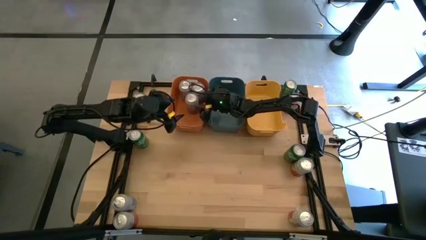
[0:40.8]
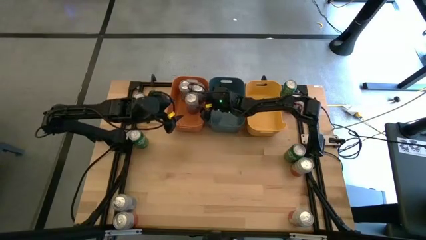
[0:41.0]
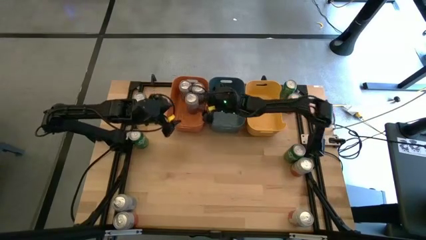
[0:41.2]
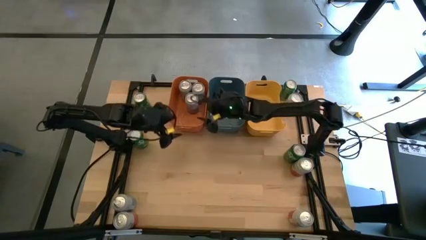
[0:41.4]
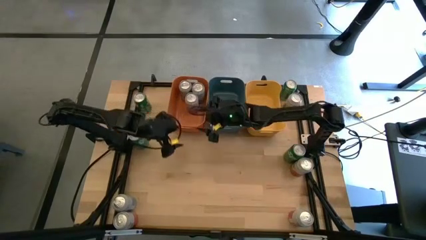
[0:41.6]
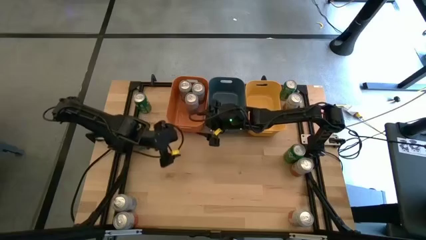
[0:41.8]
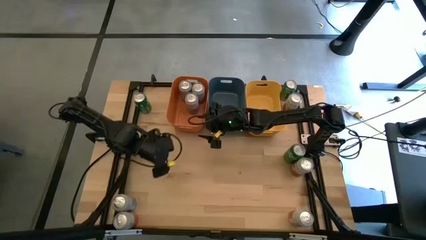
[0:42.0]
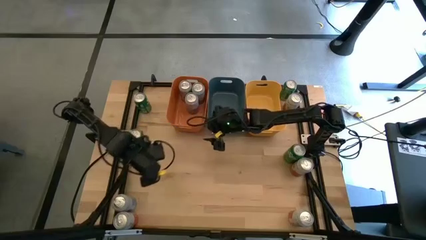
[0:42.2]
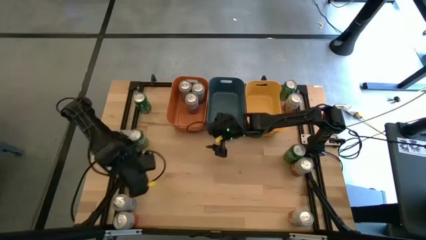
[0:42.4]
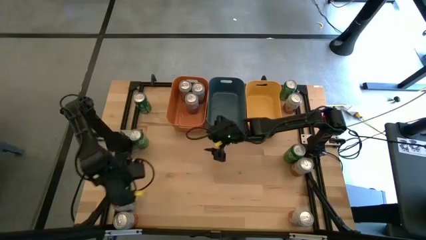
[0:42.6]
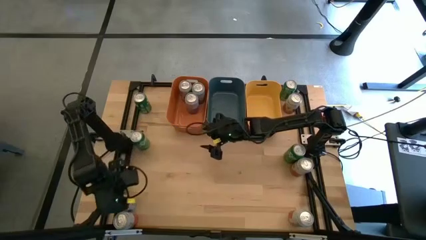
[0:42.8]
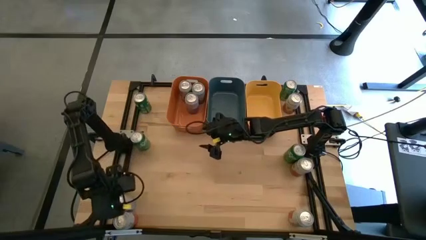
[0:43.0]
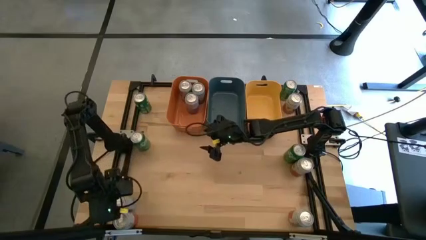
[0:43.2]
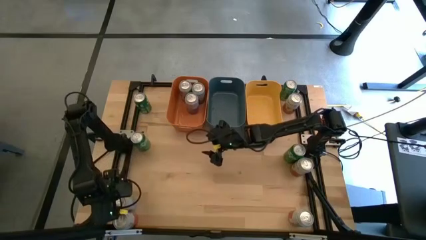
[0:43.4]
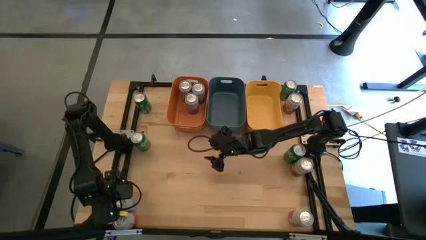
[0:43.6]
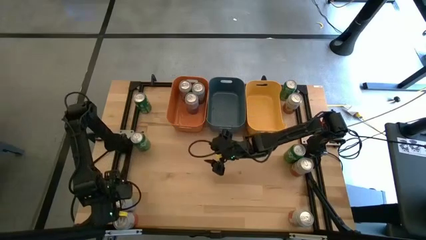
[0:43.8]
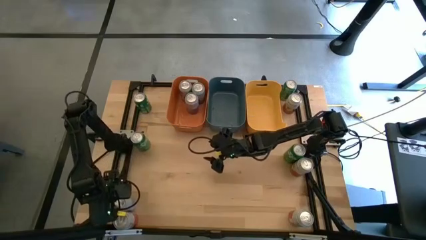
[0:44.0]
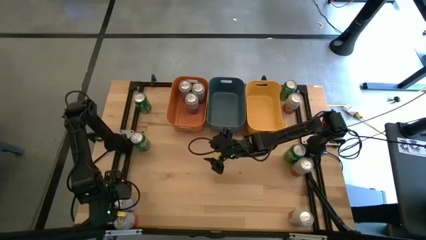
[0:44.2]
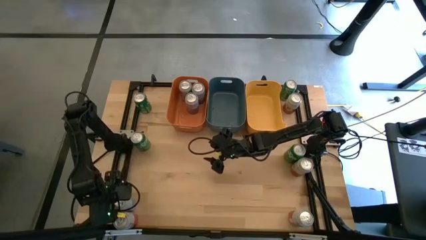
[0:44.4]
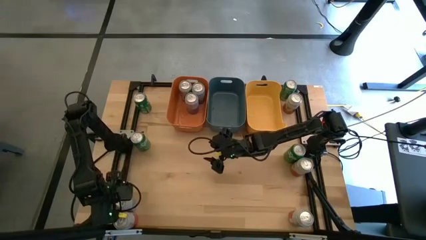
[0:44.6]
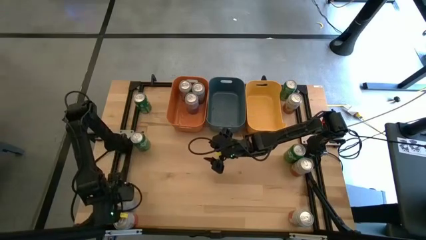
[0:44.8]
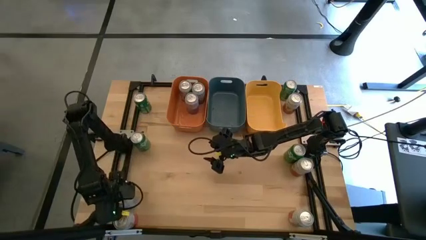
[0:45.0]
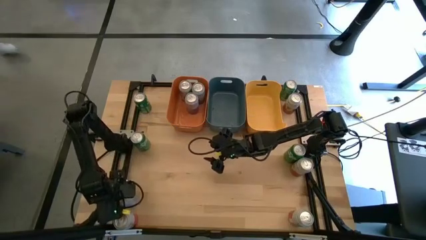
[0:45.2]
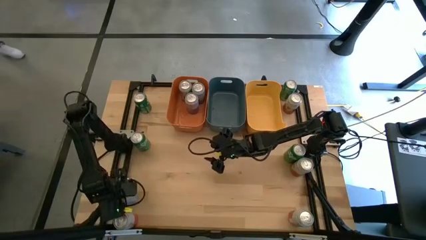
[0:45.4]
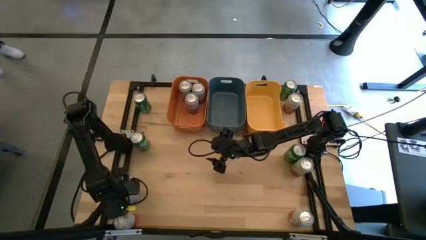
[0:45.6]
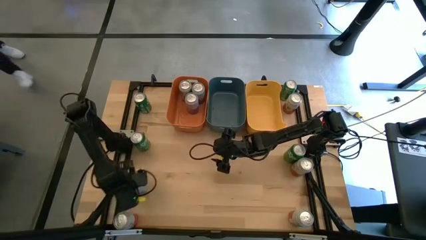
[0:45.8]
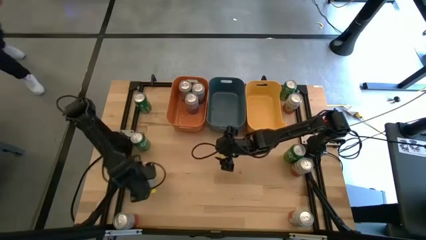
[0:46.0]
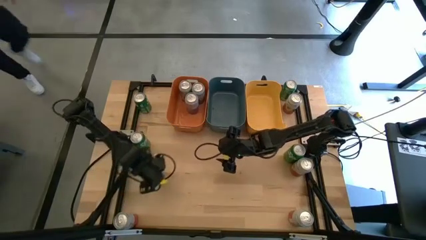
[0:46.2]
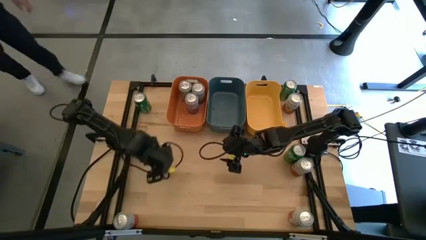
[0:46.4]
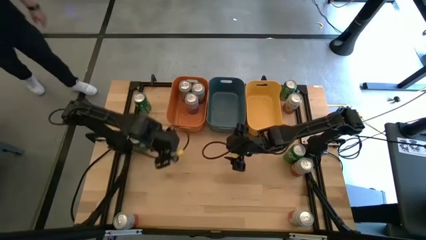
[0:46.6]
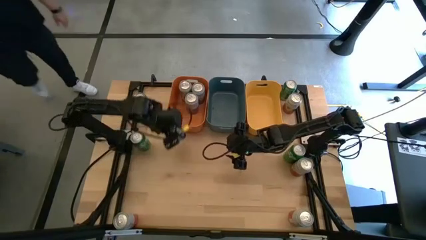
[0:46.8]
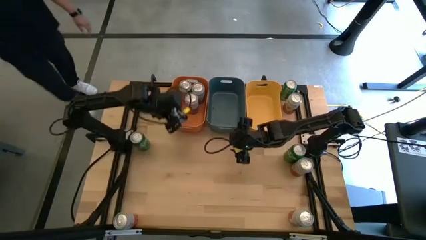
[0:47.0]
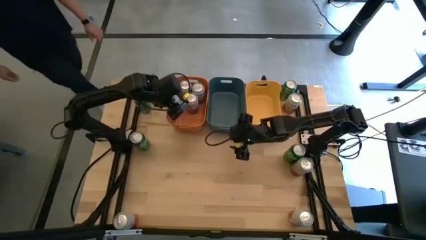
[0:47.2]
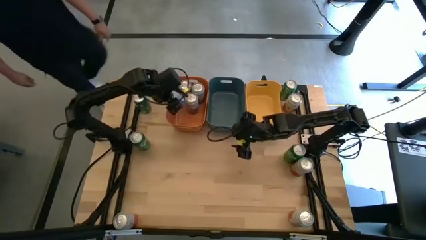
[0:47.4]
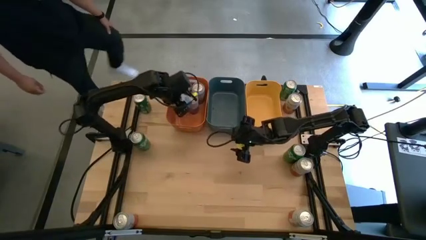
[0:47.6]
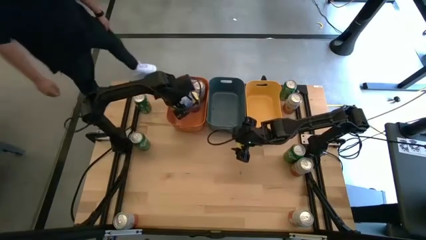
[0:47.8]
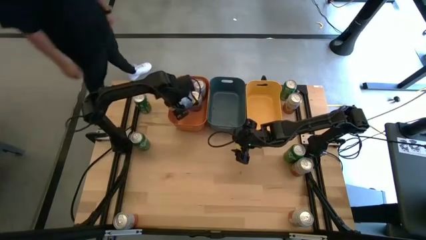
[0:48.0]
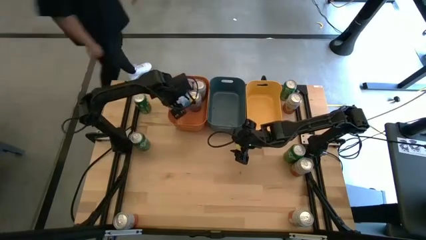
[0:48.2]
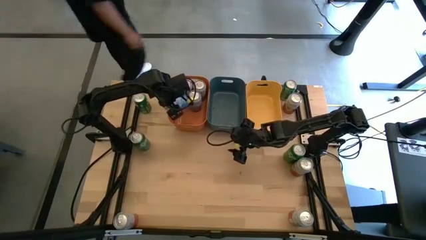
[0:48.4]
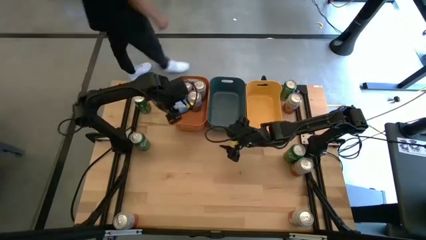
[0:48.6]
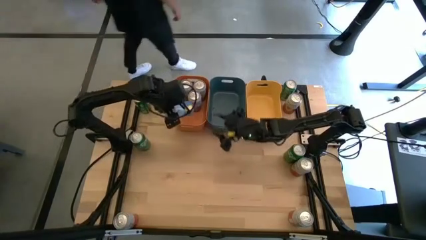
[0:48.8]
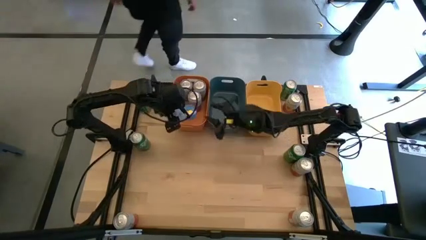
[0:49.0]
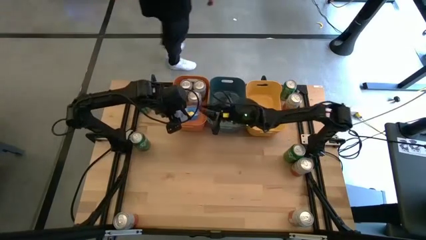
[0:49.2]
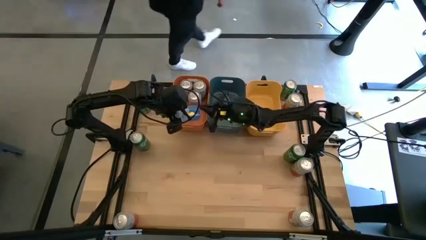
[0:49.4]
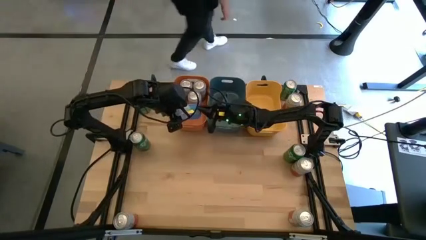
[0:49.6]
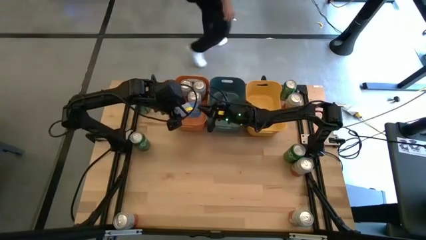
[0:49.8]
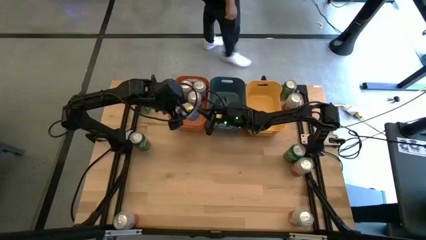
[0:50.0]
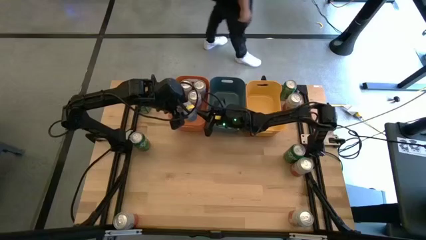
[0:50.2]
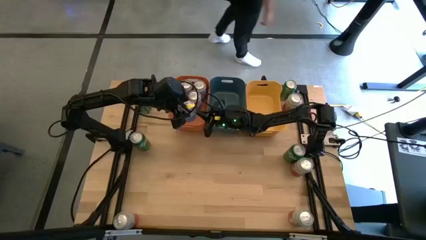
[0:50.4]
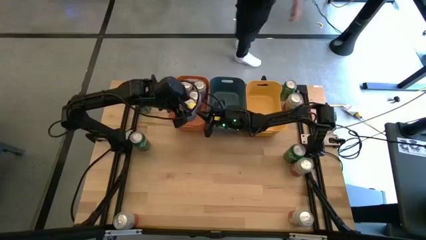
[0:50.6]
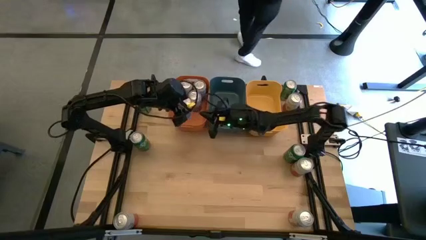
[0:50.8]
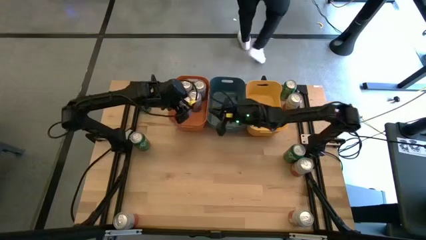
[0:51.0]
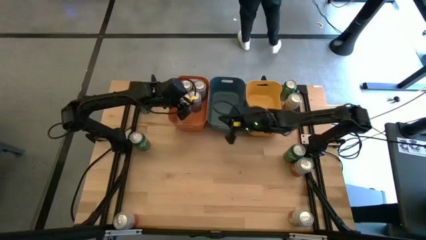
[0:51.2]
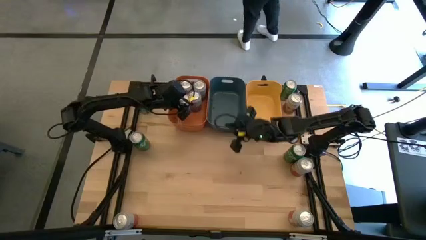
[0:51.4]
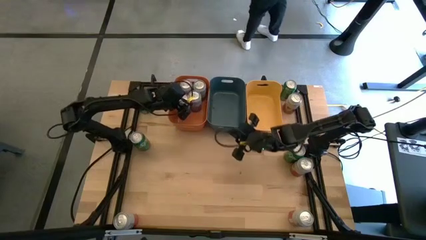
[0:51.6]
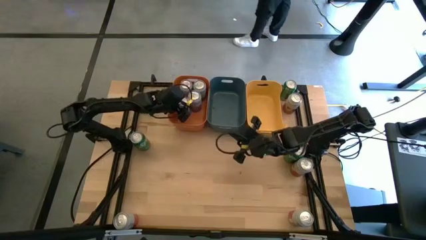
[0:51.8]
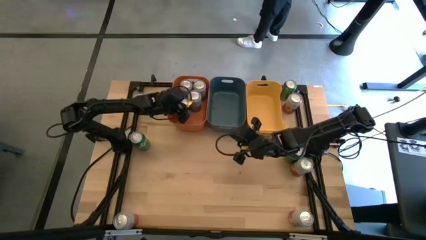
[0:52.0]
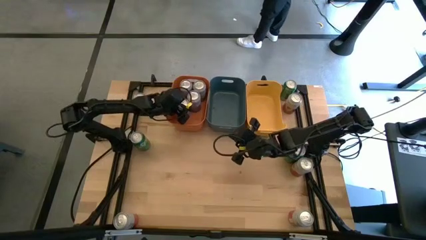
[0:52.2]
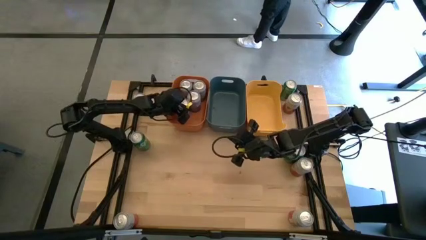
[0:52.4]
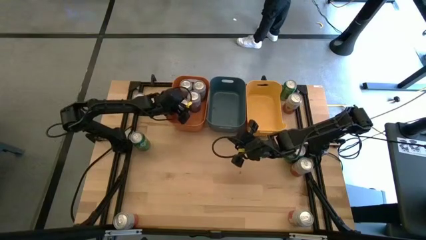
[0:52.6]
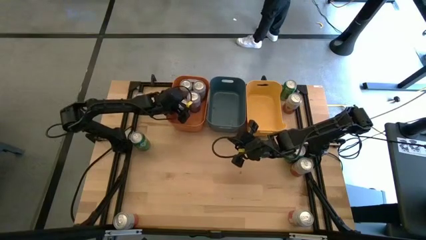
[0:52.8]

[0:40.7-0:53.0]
Task: Sort soda cans
Put the blue-white soda can into the orange bin
